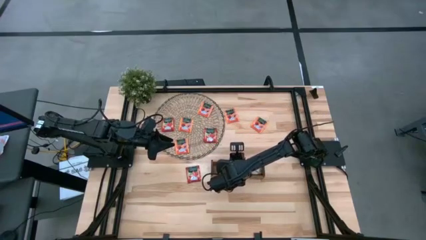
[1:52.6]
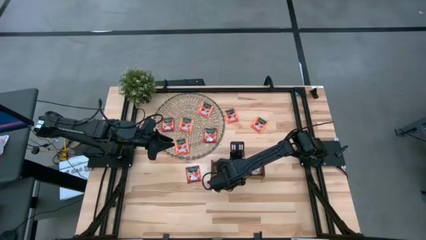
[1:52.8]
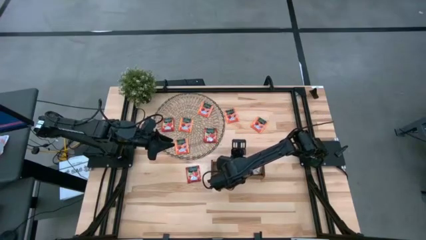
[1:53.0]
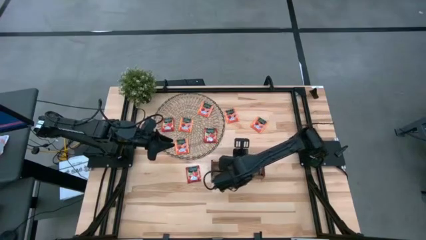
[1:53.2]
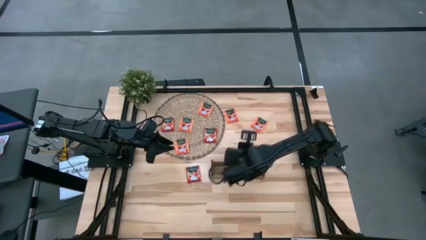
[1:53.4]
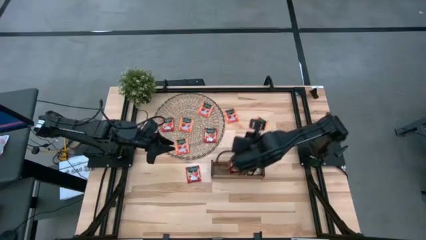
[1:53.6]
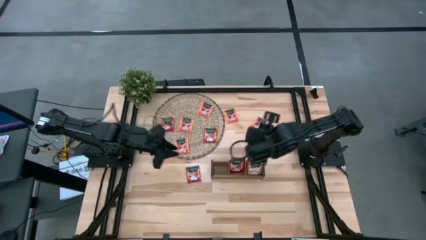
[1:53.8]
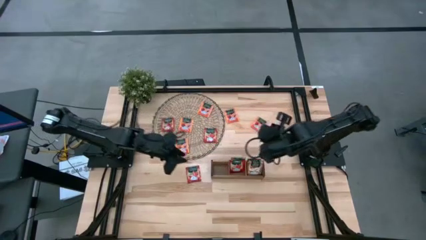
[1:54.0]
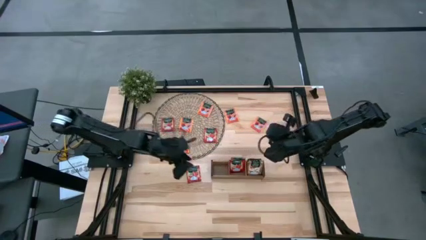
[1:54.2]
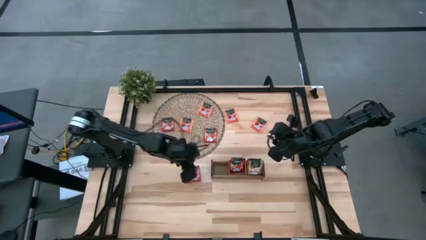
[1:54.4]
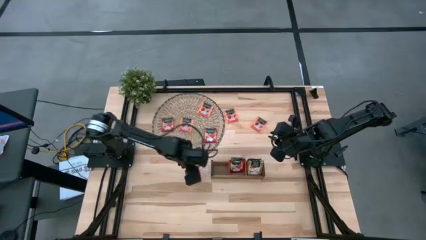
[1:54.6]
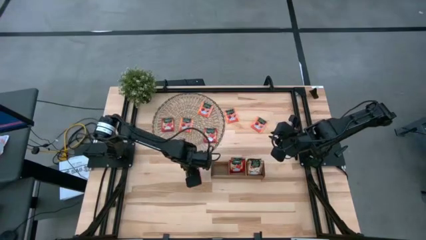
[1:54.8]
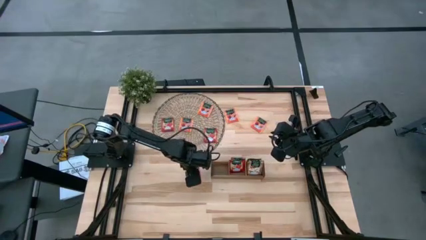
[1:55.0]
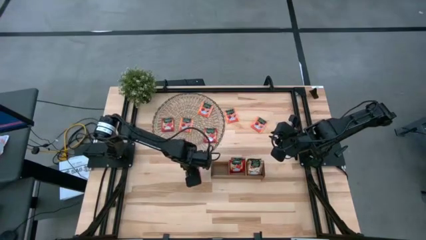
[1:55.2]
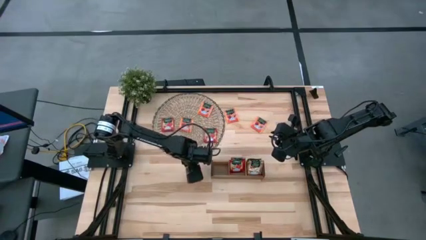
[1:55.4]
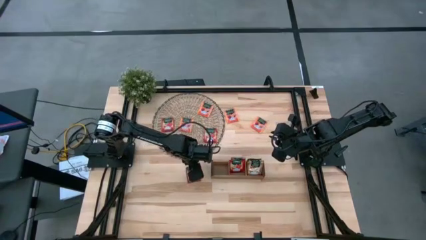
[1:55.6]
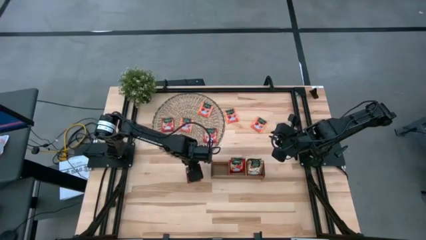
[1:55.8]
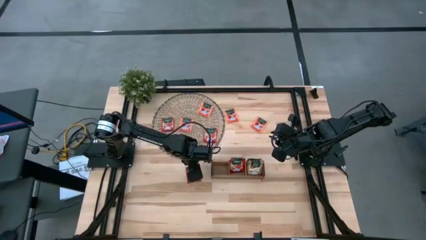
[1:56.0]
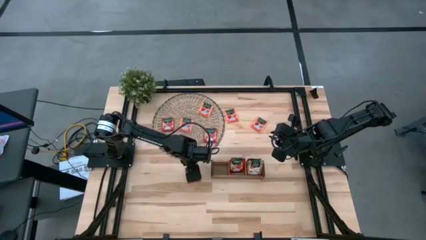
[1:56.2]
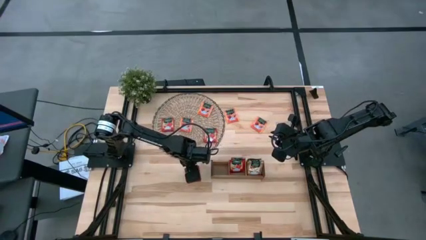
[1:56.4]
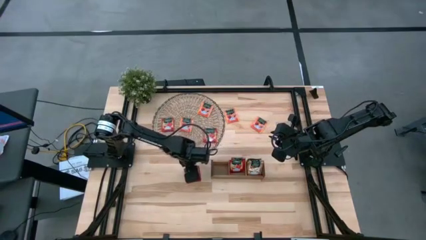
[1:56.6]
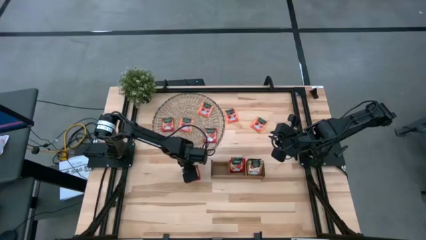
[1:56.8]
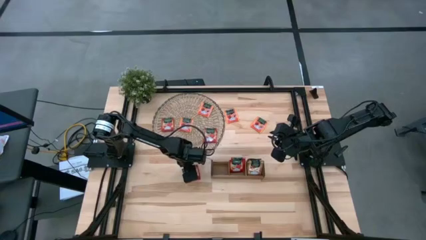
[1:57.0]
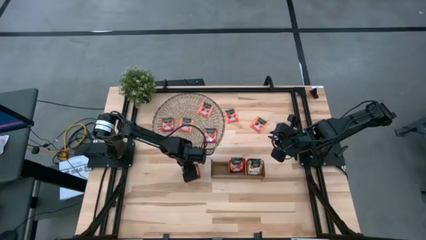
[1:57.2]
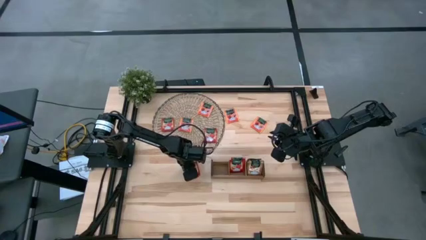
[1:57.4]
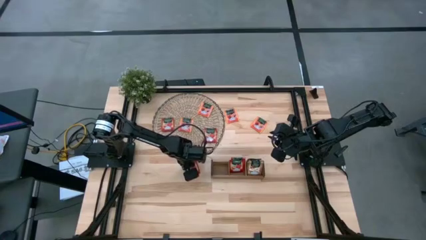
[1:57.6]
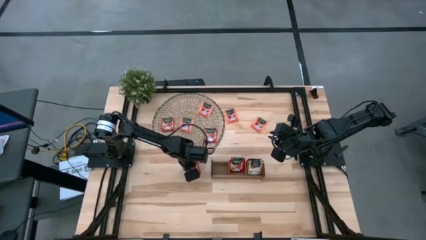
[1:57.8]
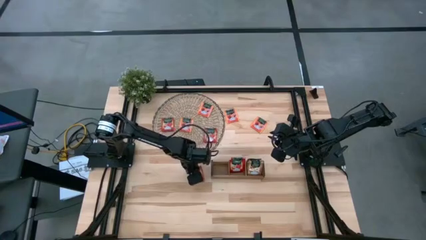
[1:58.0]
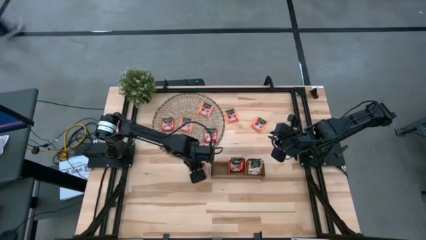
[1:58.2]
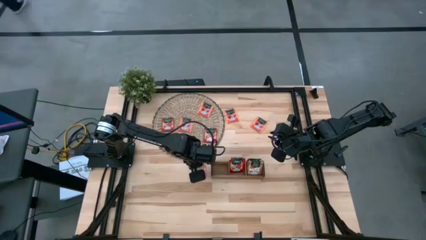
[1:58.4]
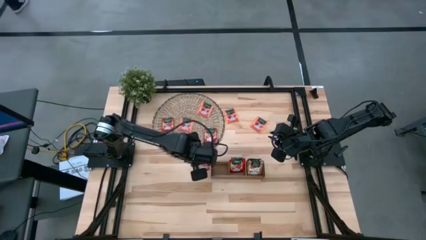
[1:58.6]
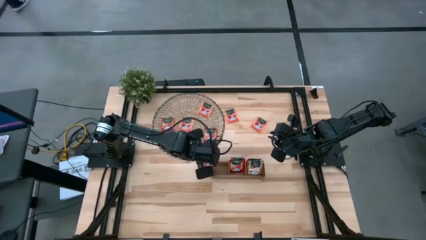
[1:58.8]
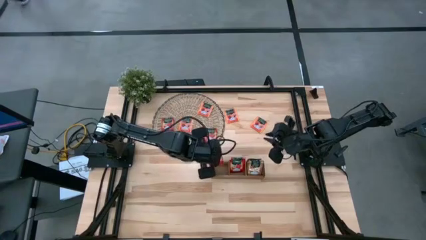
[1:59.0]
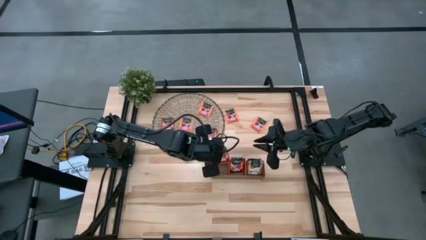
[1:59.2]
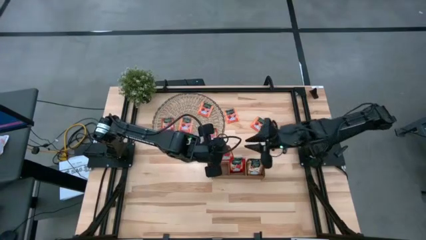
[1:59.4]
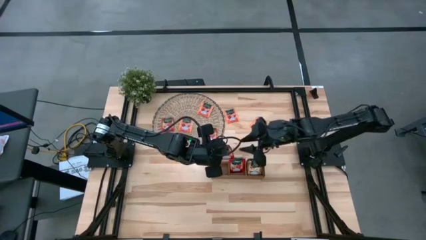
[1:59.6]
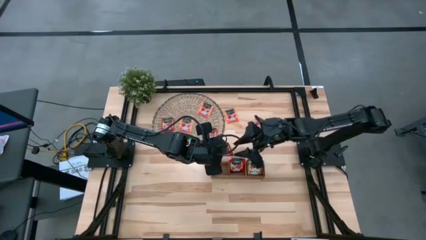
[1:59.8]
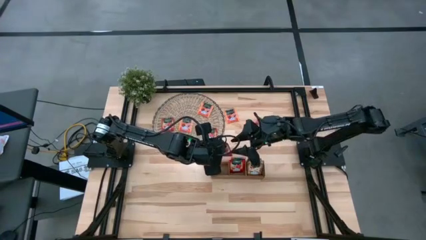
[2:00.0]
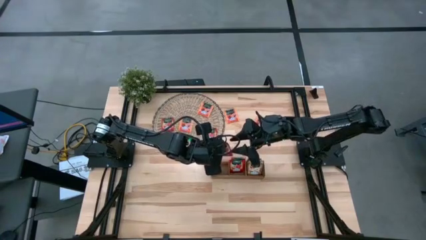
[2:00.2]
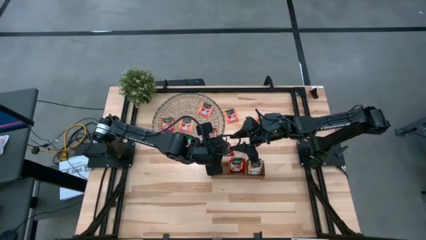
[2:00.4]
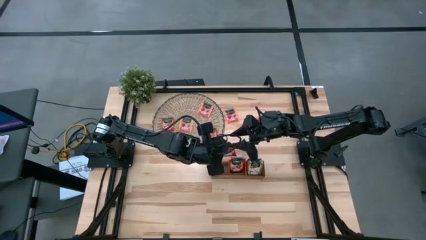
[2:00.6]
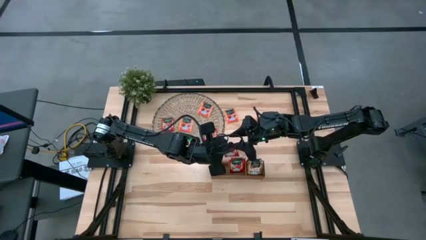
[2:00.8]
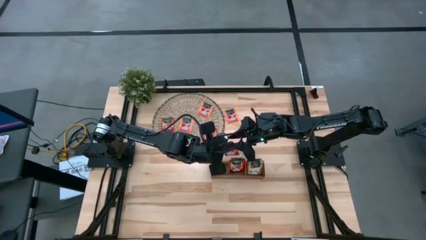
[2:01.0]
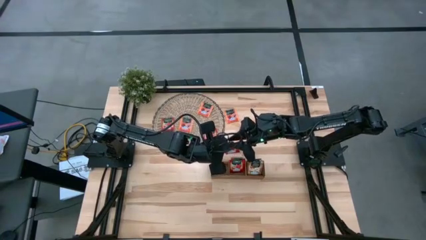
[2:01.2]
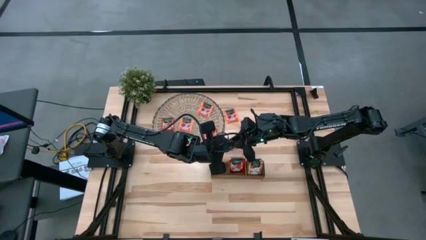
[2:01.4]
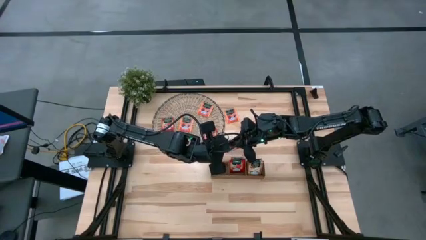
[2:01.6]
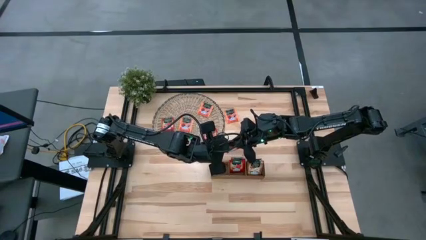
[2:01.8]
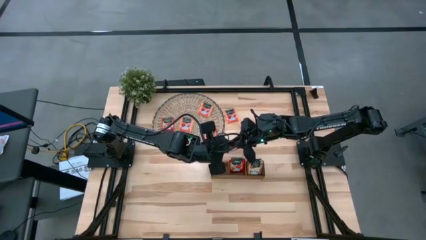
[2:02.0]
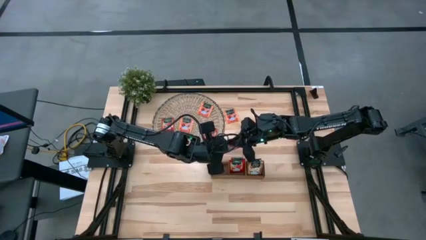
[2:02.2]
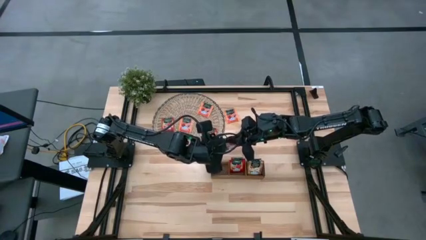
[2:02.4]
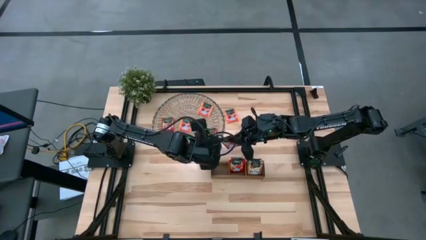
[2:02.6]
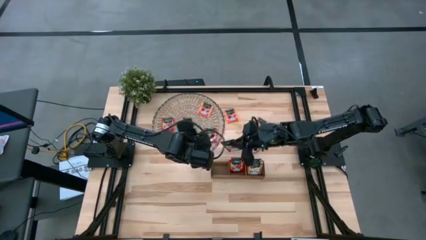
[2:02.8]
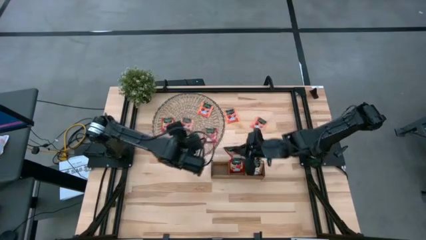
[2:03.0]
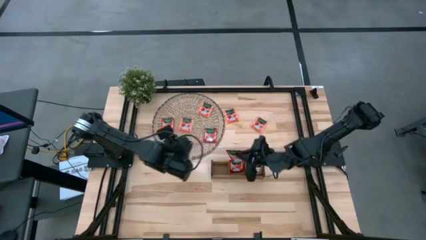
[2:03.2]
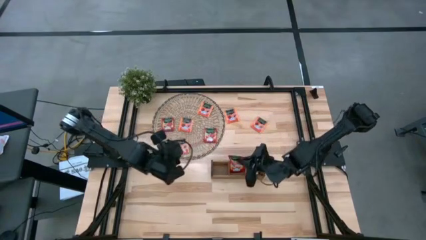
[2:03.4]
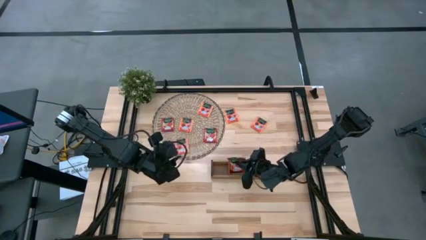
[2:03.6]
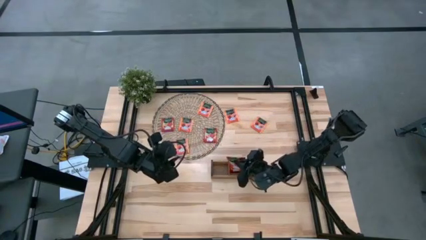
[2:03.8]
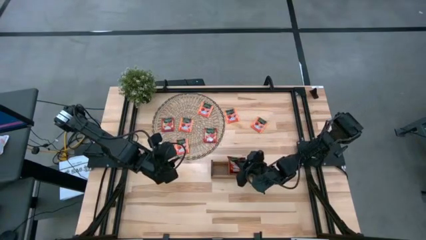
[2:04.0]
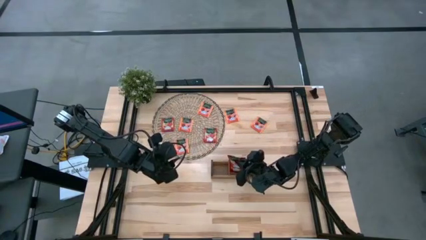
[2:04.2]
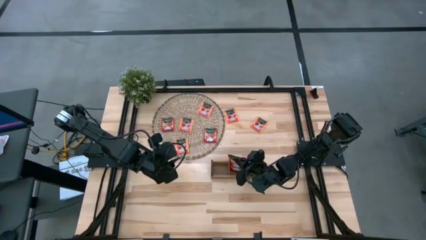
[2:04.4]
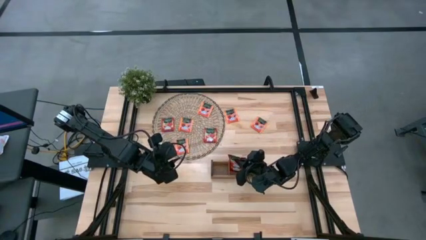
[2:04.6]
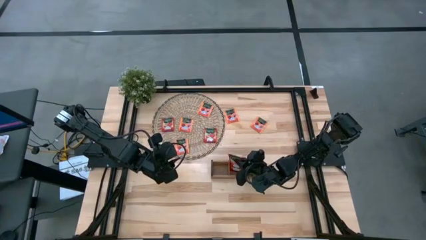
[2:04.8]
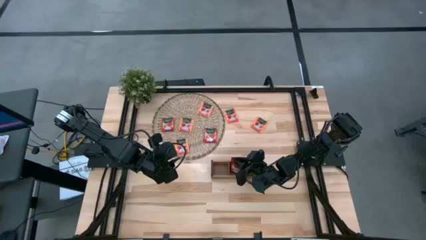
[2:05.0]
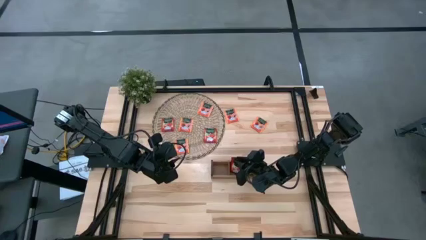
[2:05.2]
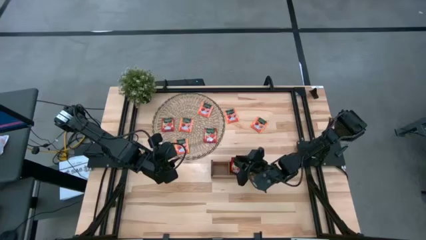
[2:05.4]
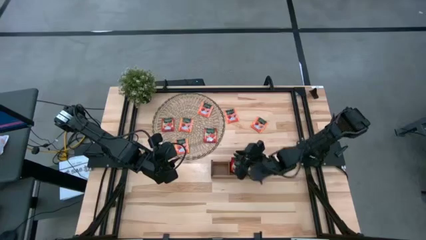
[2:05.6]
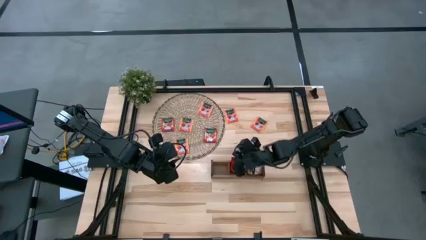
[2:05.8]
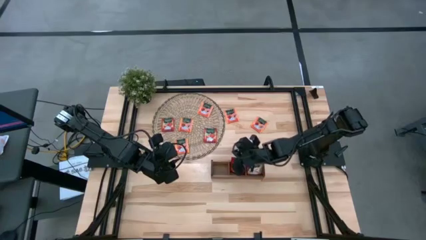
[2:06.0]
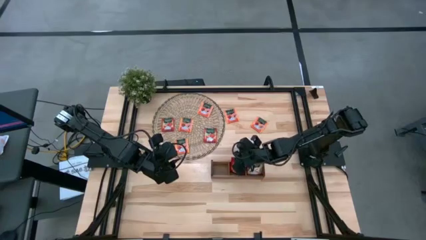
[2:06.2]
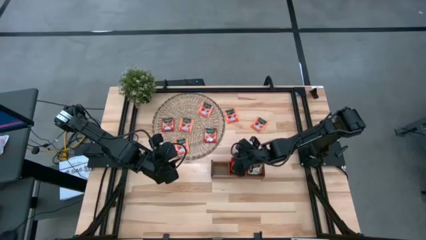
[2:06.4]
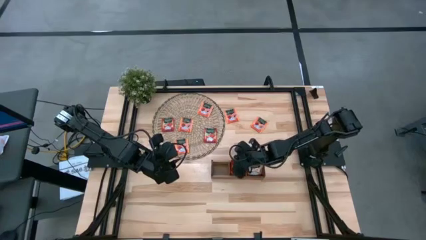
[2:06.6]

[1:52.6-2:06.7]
Task: Pick & Place Tea
Put the bottom red tea bag into the middle slot of the wooden organizer

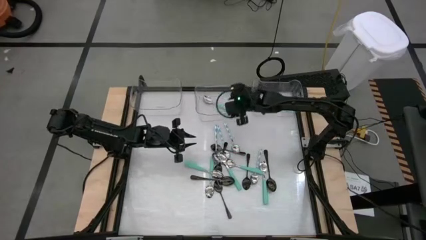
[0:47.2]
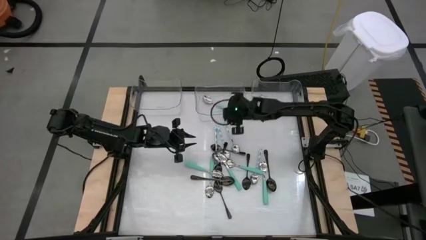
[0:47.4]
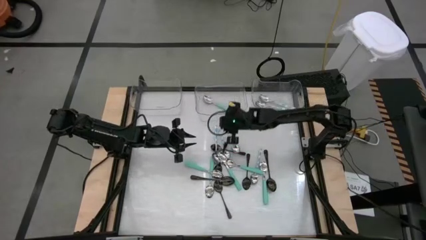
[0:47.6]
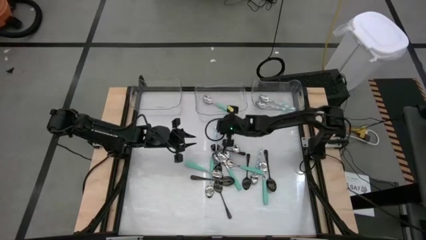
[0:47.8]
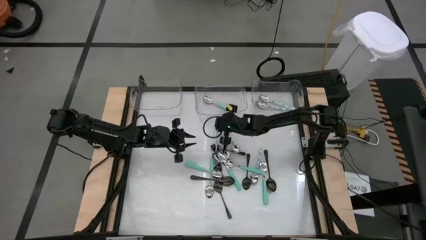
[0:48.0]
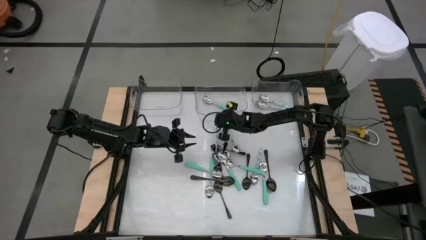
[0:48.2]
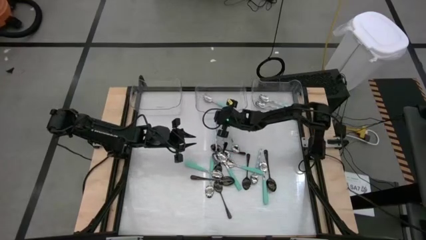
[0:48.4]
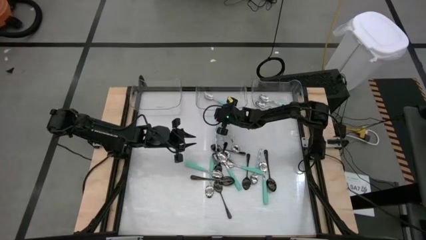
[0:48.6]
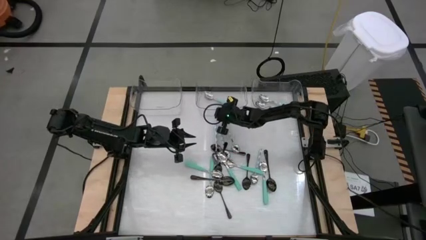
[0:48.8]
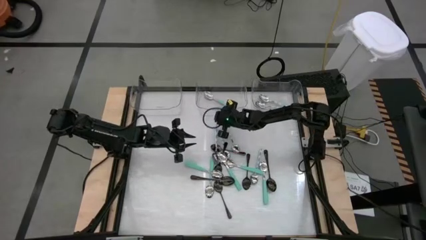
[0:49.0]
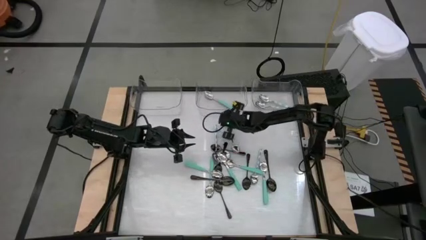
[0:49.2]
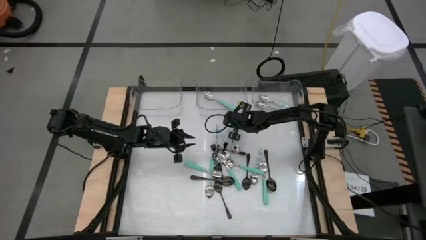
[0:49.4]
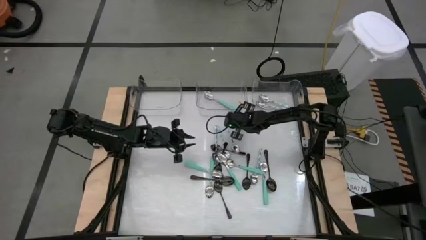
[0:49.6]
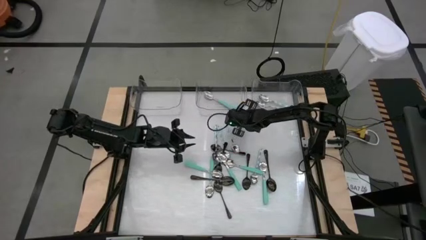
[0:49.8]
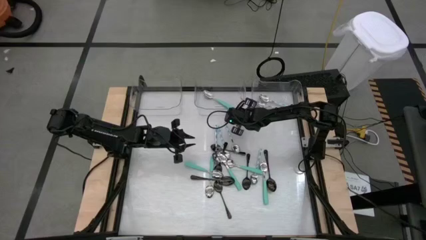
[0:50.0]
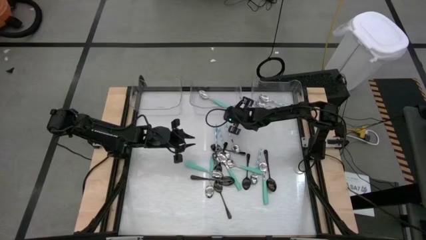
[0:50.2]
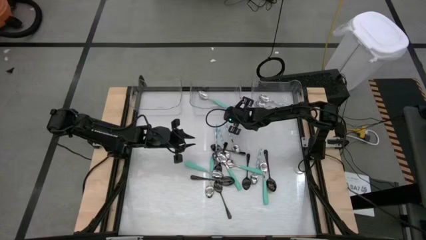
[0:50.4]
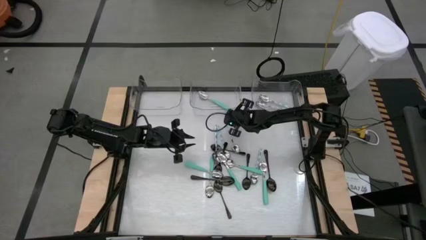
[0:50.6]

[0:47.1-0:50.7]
Task: Sort silverware by color (type)
Adjust the center transparent bin
